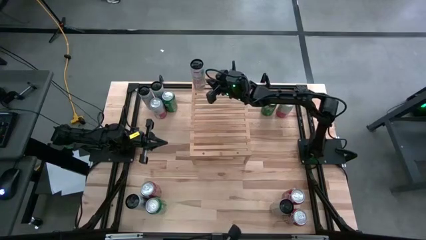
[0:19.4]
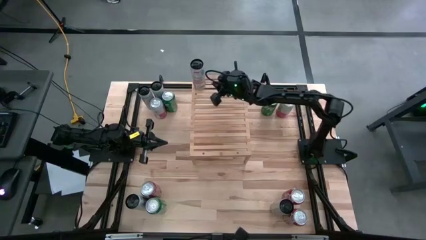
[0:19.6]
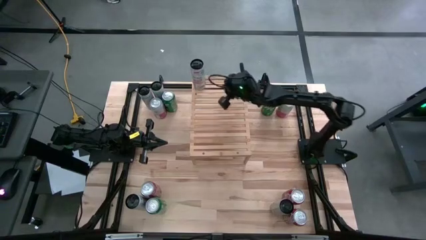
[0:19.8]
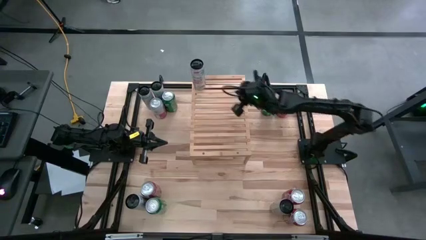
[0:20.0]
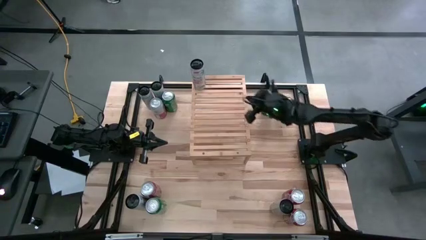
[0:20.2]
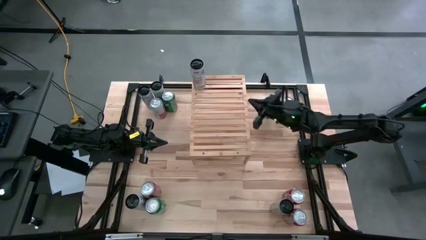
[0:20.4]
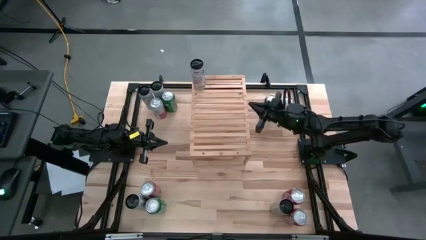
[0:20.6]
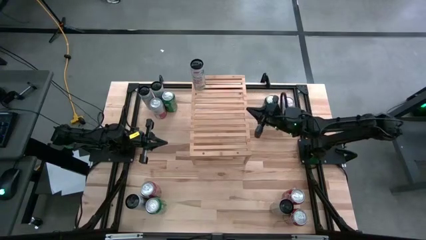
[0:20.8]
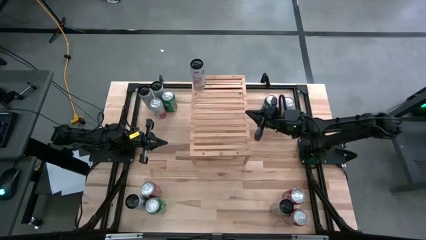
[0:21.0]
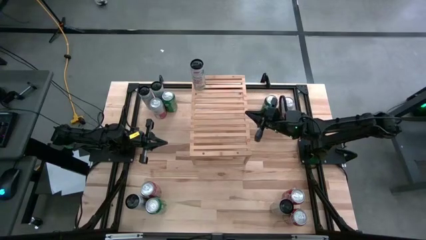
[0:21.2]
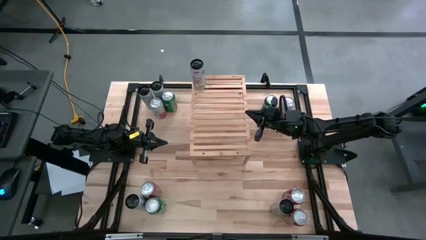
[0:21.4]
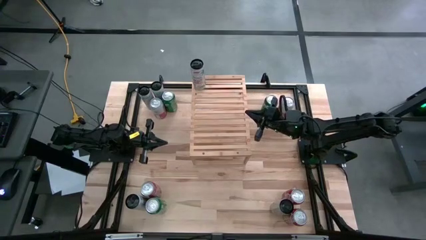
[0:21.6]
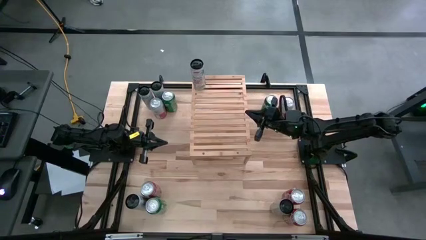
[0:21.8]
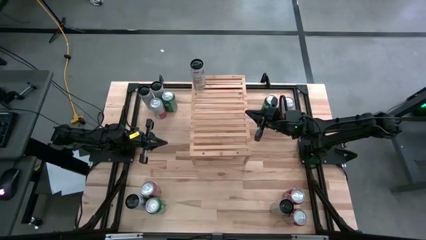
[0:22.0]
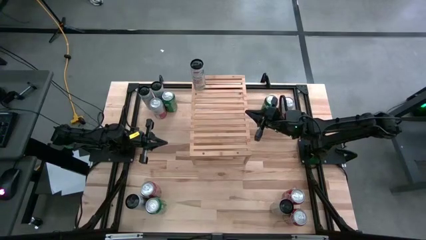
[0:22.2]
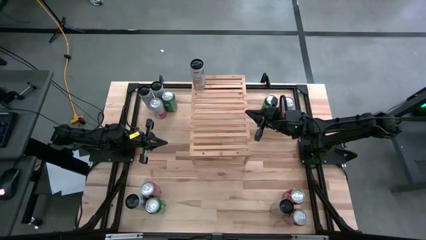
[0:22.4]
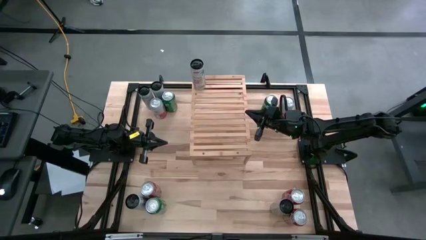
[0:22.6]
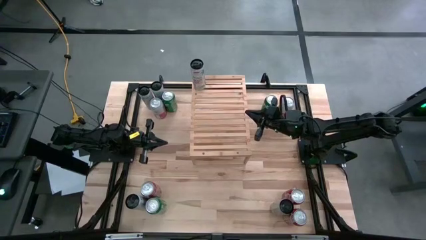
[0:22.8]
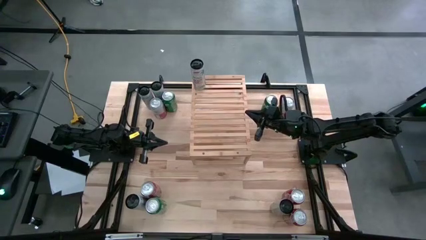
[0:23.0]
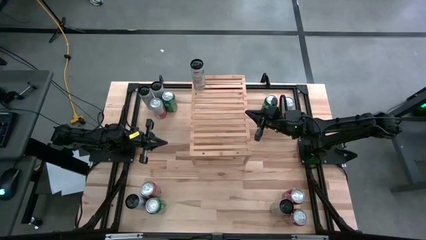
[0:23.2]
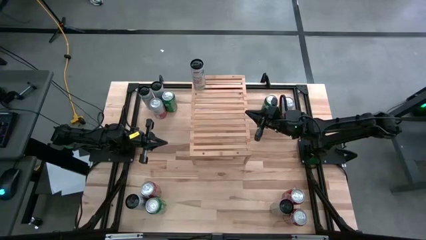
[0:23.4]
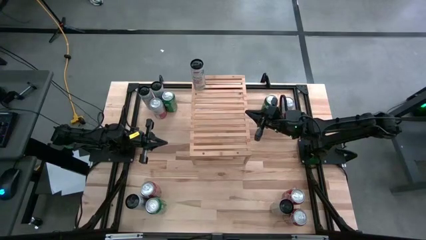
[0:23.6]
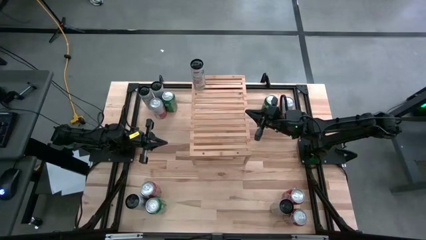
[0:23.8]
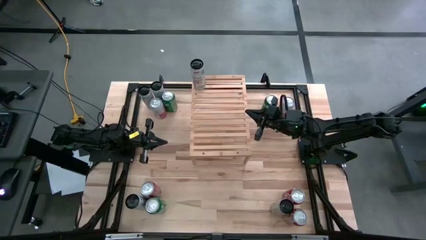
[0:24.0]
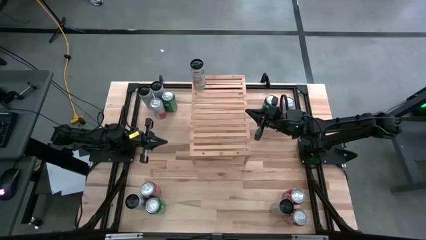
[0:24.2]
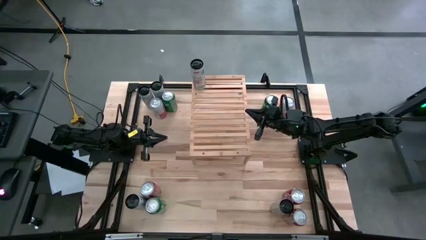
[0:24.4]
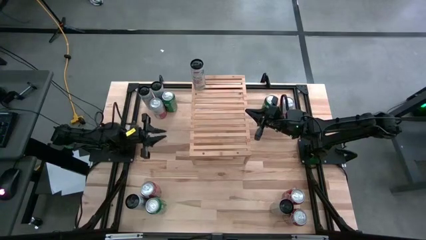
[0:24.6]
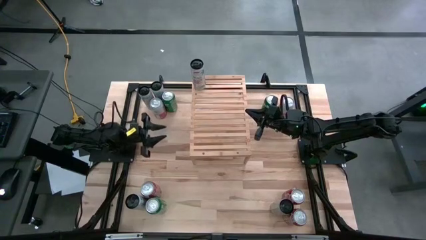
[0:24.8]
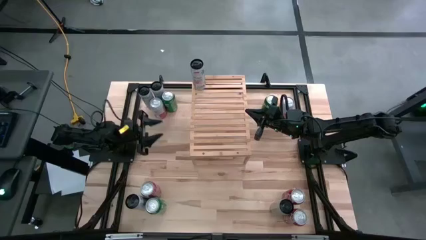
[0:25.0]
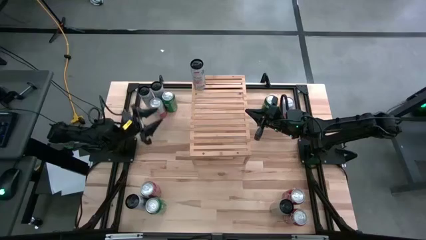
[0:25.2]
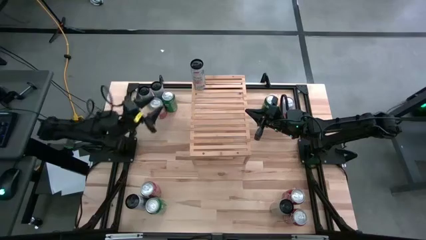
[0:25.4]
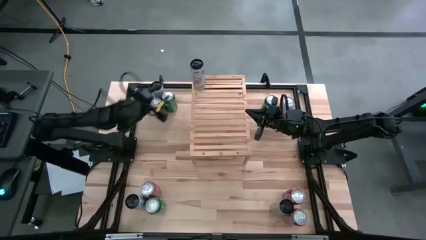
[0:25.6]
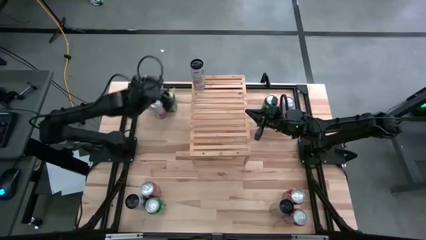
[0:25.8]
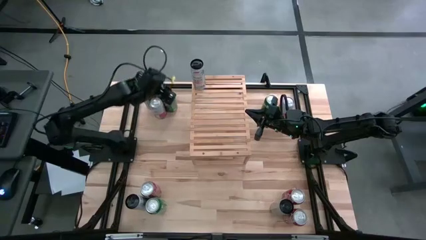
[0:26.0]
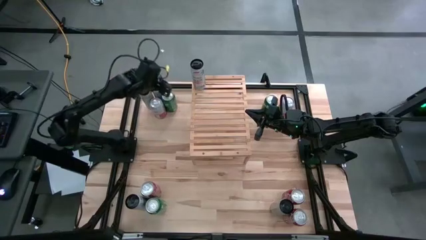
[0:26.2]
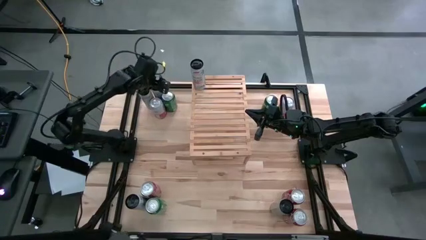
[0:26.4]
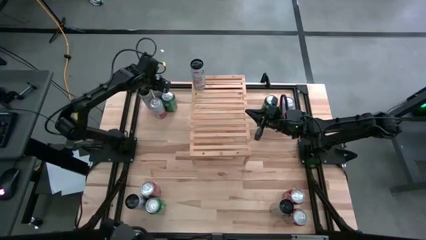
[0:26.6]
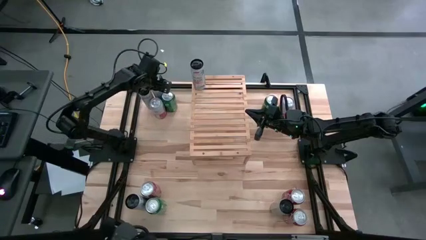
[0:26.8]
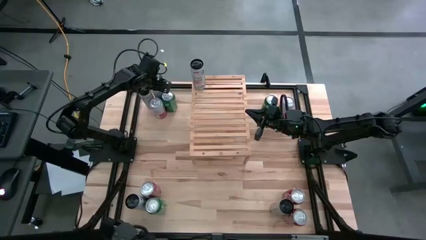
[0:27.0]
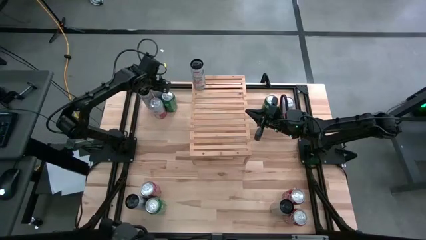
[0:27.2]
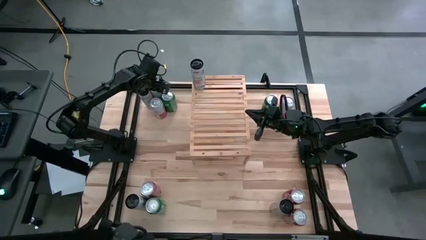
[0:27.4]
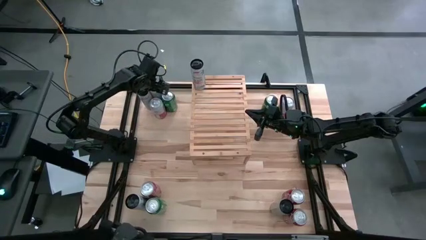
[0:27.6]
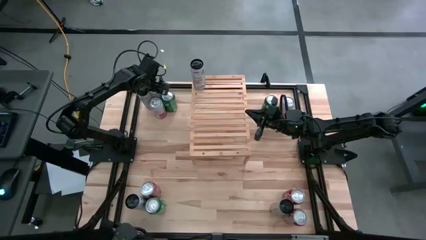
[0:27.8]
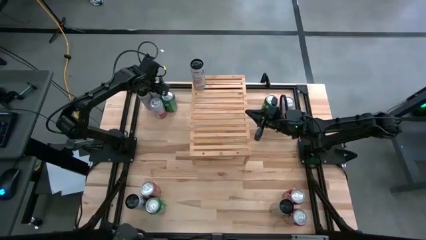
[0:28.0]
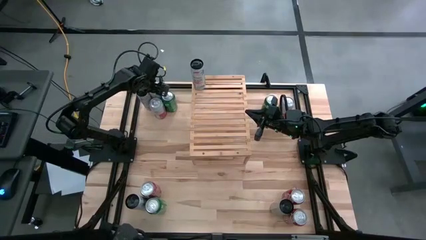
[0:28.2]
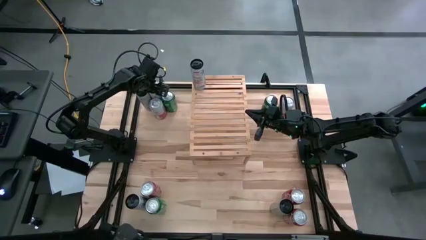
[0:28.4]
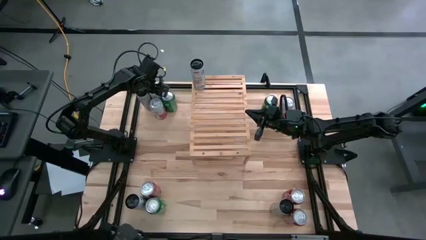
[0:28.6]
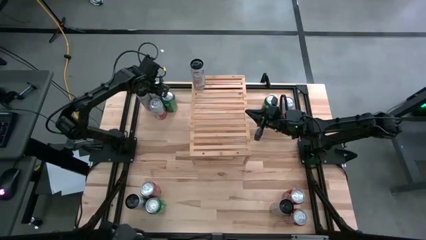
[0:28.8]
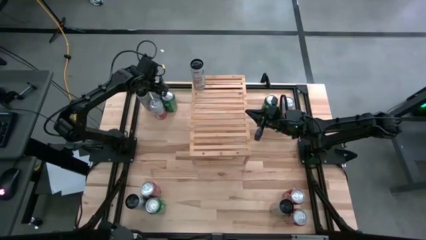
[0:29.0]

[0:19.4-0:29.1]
Task: Place canned beverage on shelf
Put the top white yellow soda can on the shelf

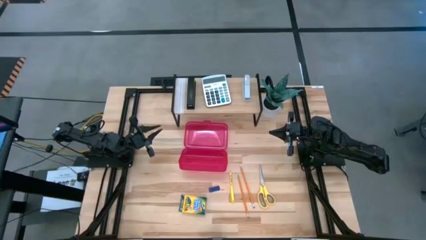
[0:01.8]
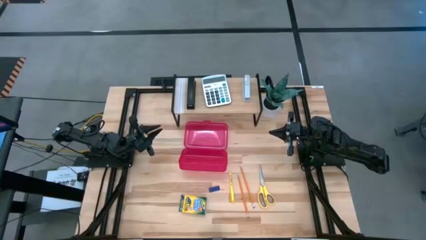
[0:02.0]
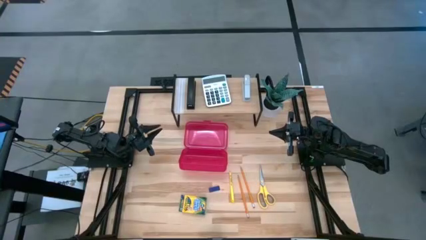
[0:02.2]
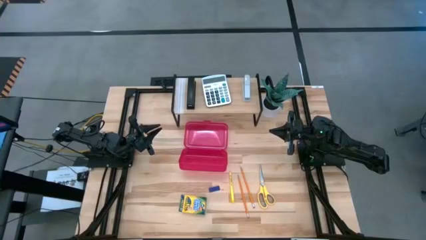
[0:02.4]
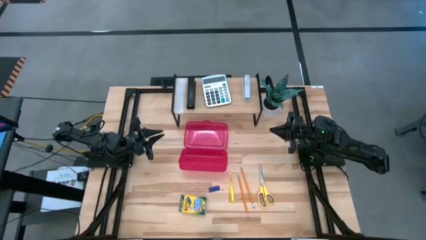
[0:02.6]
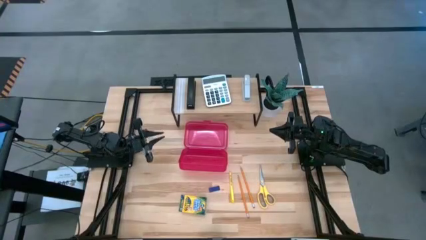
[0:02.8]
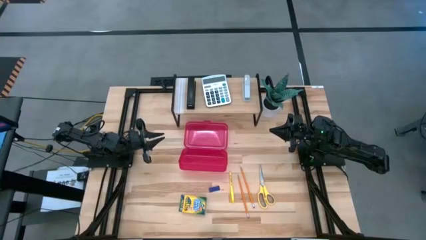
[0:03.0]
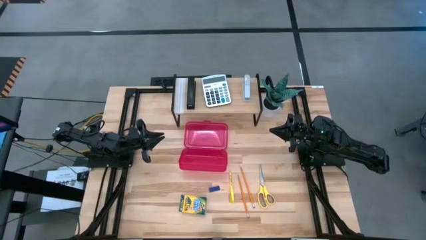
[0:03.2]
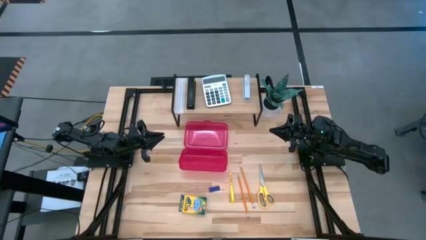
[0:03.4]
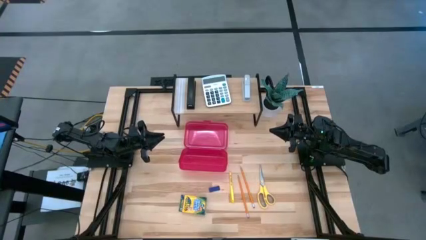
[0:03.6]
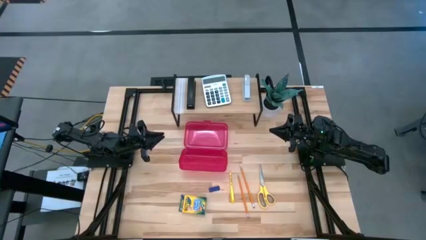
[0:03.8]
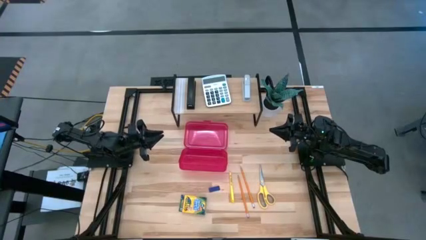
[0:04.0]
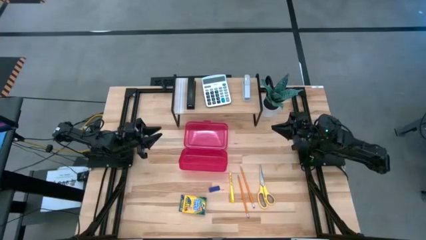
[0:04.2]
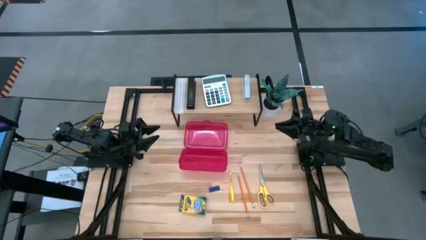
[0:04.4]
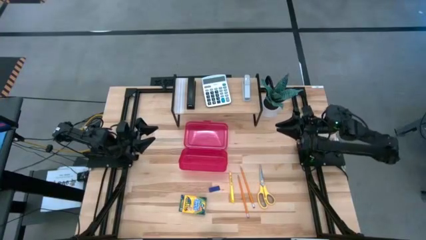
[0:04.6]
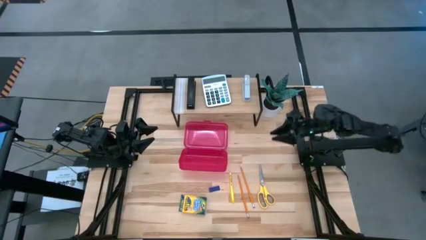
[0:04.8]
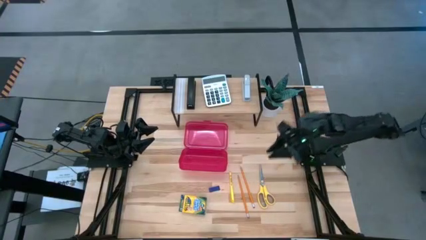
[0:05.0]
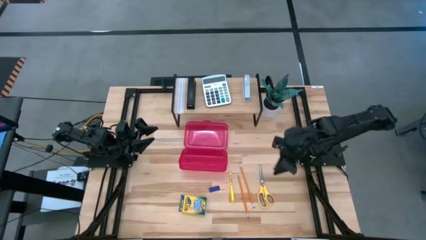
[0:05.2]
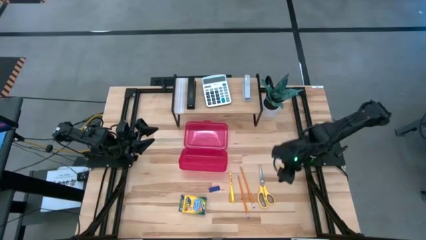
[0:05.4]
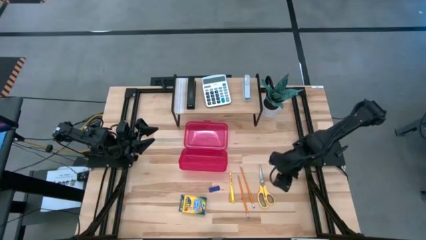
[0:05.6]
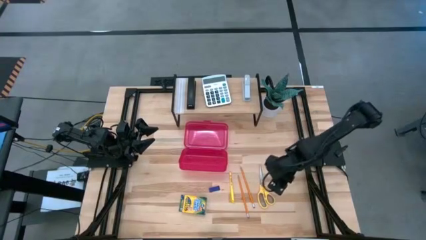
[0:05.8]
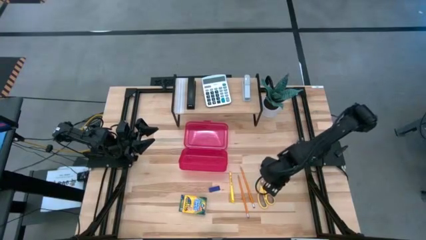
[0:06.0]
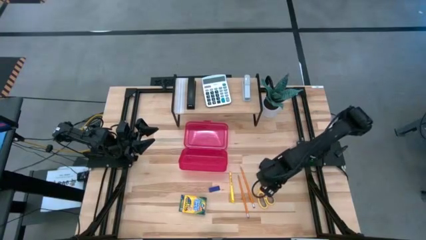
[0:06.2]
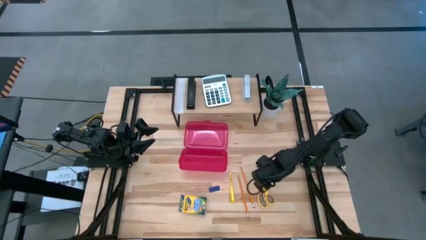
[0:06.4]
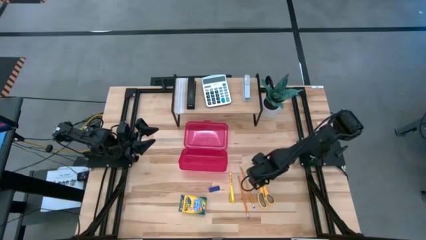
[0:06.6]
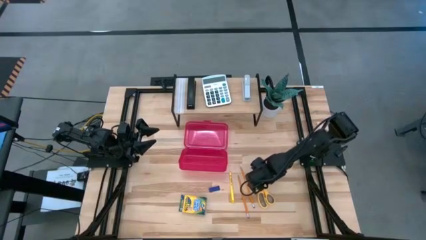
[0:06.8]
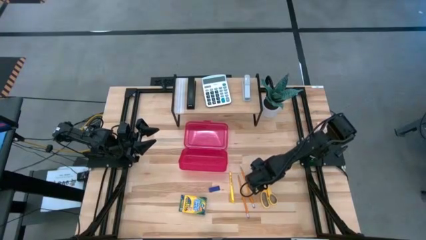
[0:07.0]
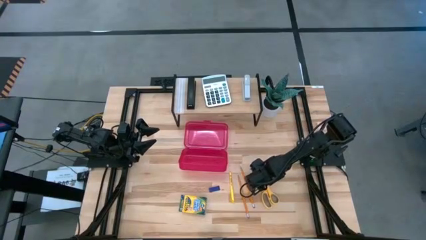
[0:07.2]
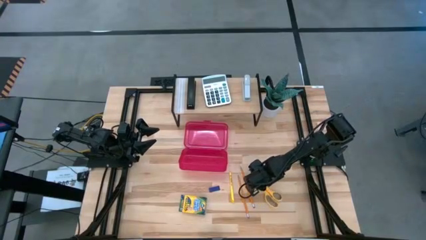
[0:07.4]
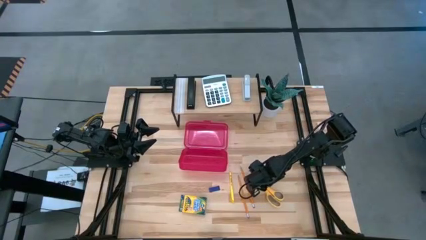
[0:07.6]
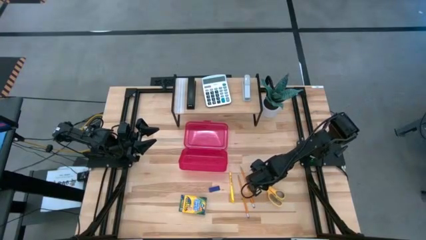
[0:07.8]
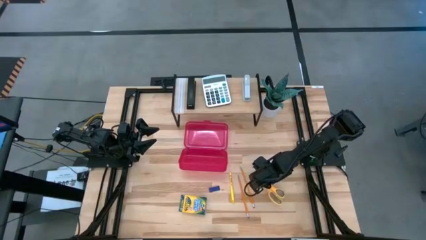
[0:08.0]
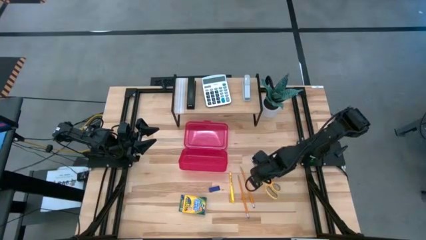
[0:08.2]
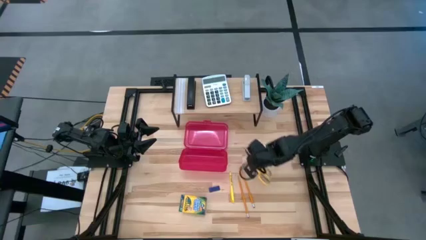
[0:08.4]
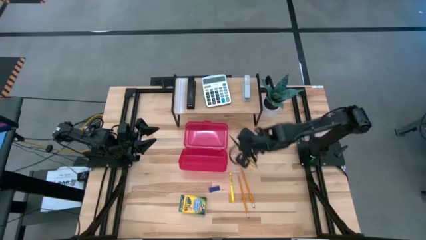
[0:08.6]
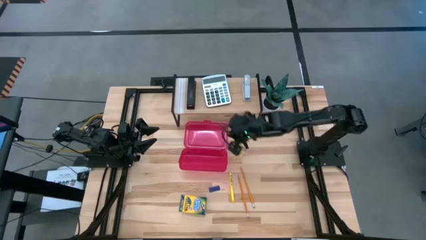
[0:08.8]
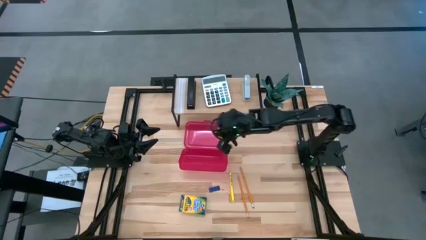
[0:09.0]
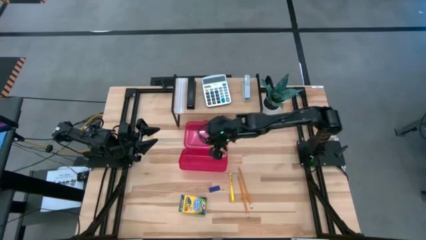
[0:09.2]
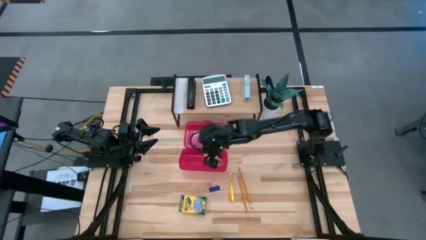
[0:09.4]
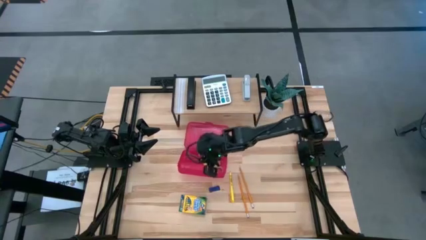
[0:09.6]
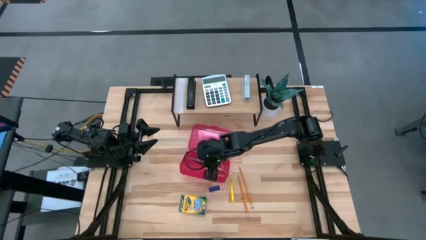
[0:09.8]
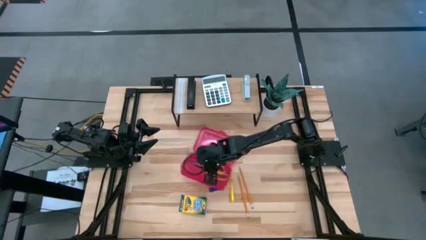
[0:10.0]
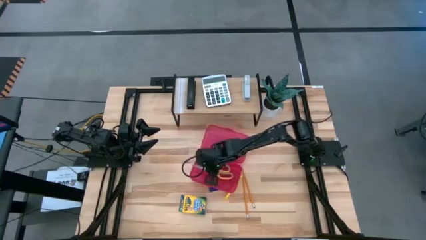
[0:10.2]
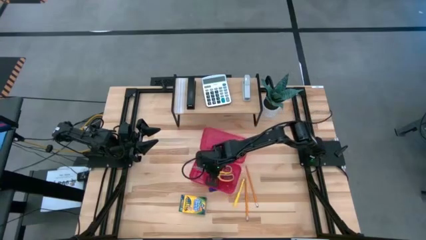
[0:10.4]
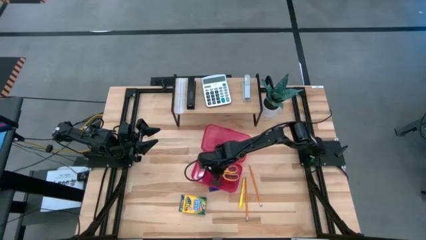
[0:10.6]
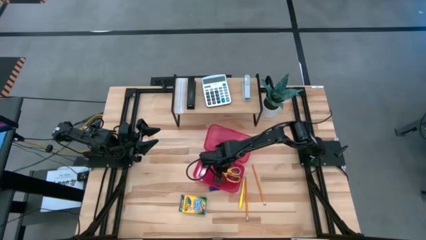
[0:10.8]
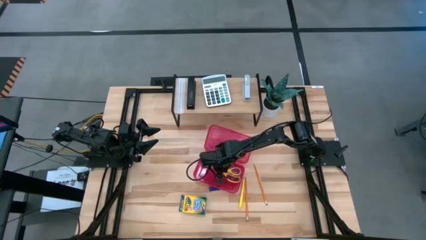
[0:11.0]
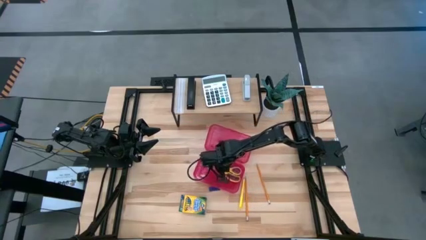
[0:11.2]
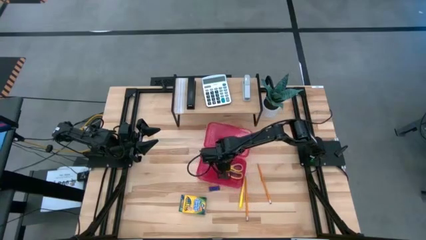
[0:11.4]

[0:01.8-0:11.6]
Task: Pack school essentials
Put the yellow scissors into the red supply box
